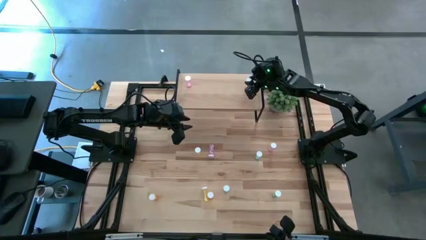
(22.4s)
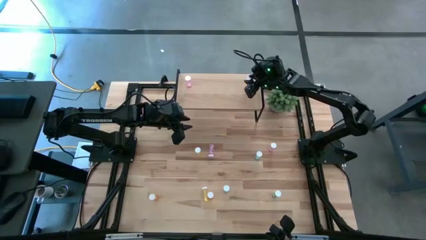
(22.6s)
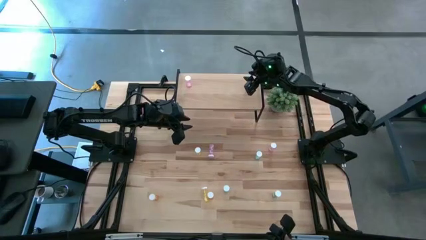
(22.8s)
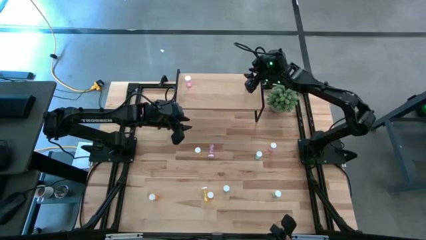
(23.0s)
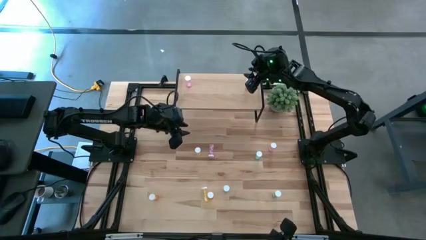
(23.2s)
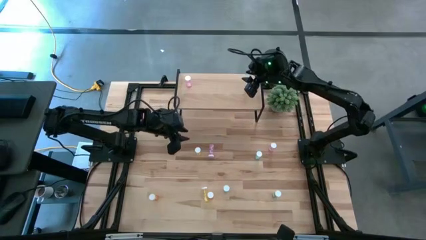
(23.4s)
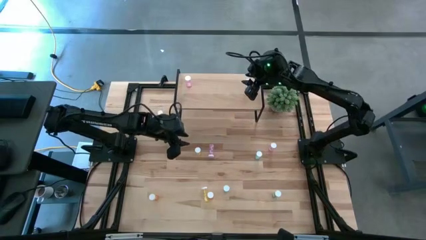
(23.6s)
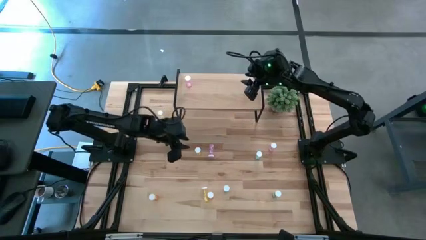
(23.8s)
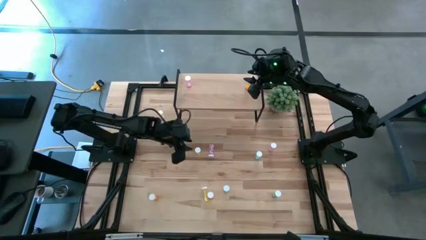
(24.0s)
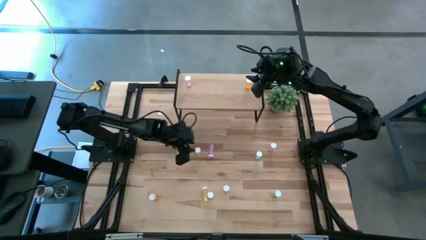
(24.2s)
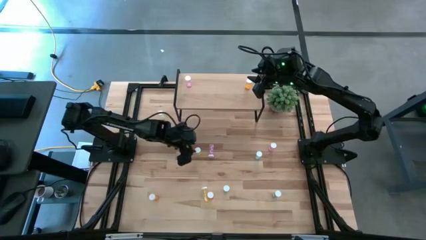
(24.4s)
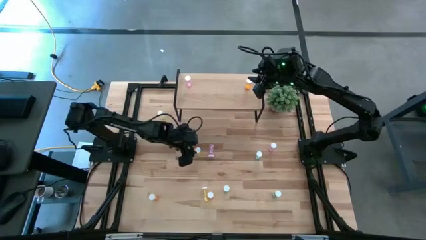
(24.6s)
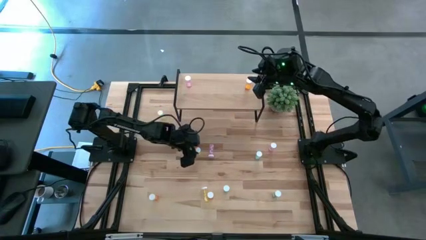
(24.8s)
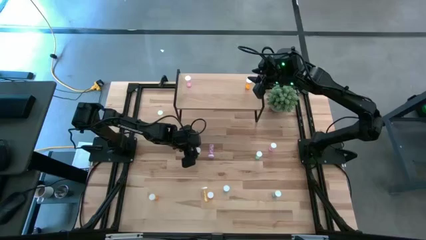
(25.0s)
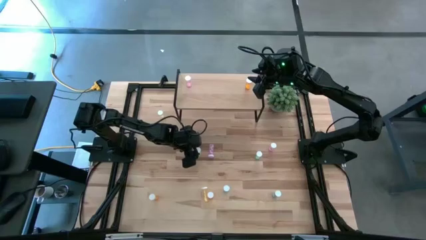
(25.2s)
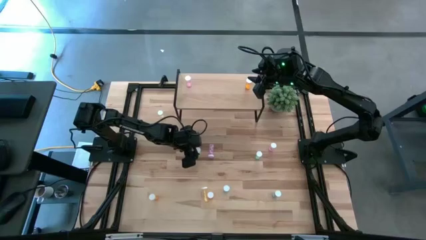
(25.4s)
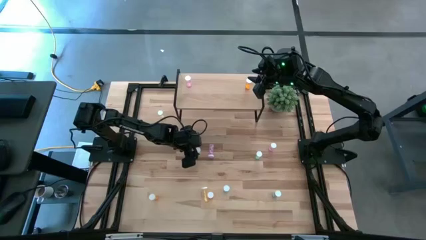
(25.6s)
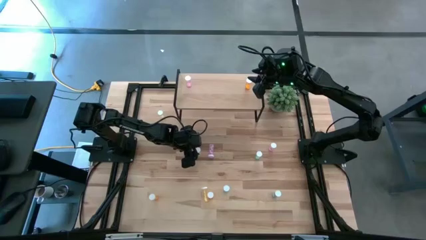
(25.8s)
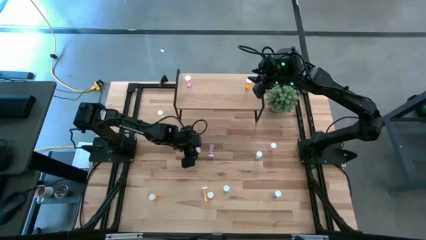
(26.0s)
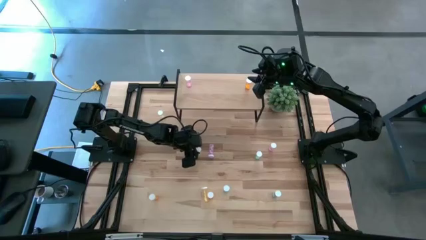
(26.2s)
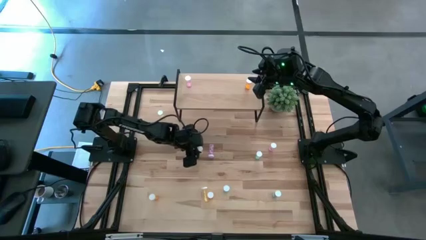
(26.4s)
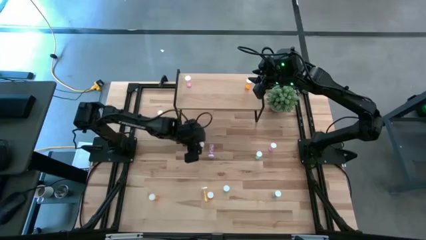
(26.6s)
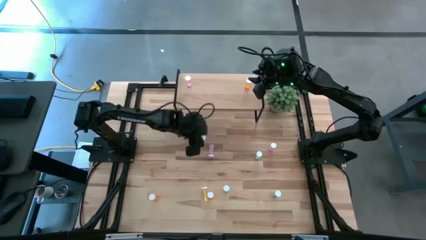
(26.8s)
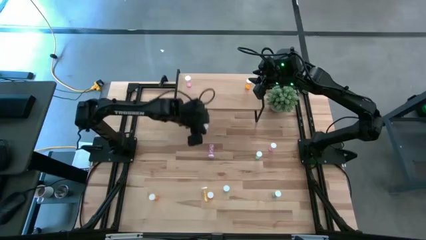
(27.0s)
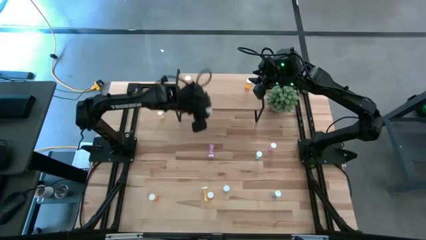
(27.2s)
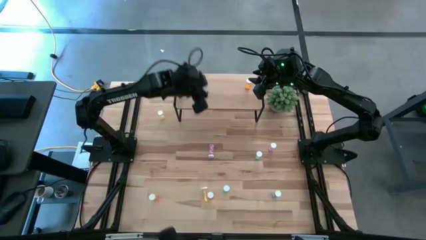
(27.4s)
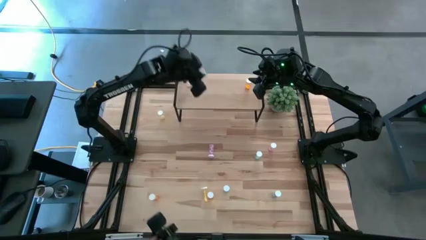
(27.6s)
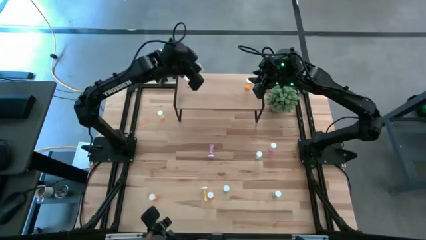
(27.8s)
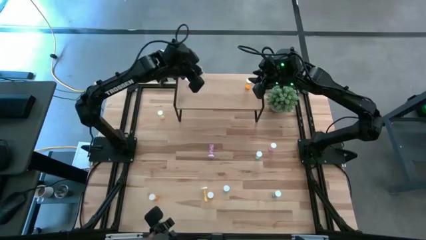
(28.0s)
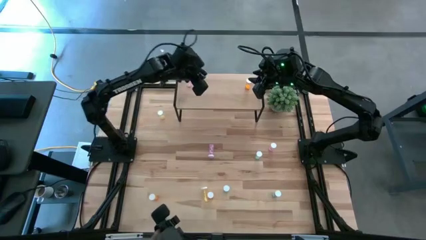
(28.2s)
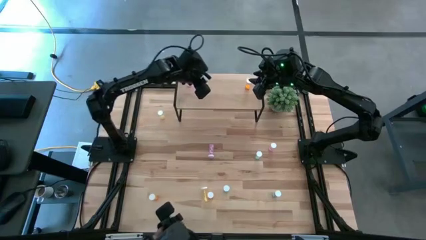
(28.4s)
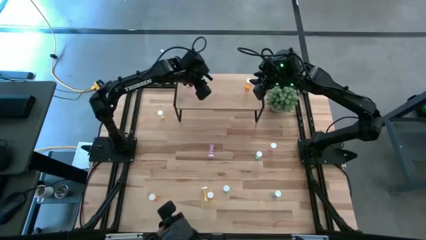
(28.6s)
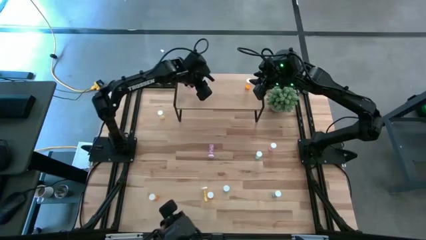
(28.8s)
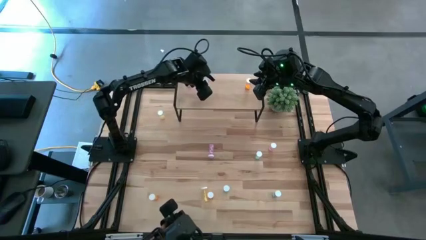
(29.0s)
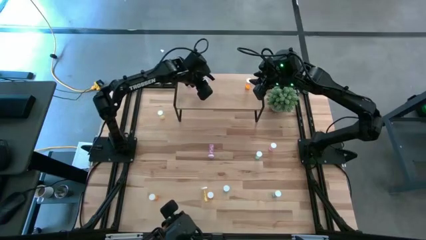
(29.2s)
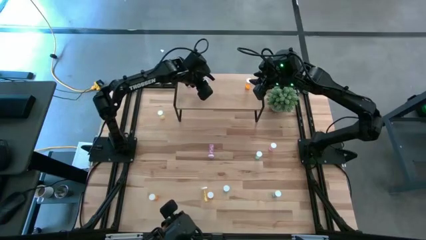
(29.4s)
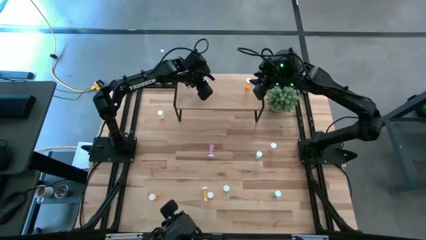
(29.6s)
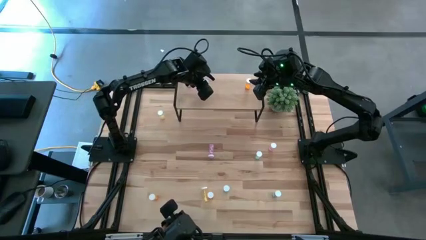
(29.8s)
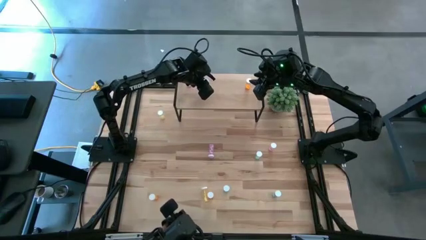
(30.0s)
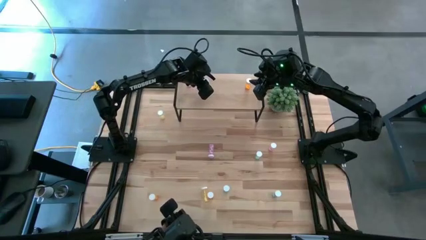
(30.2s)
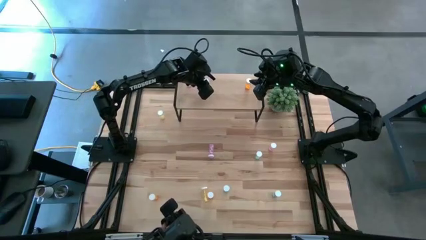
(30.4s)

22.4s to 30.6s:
Task: Pick and place medicine bottles onto shelf by color
Put the middle yellow pill bottle on the shelf

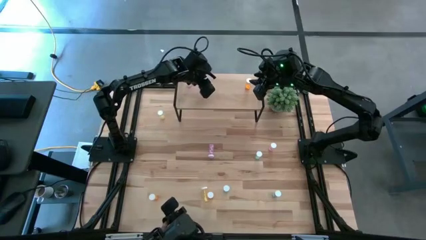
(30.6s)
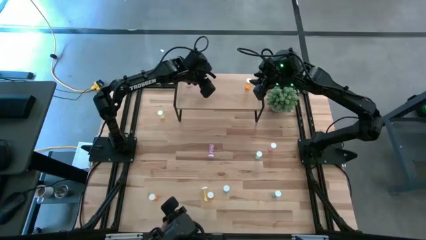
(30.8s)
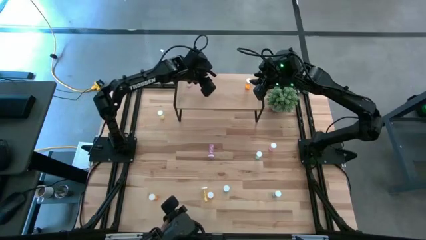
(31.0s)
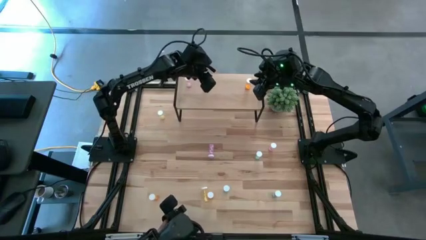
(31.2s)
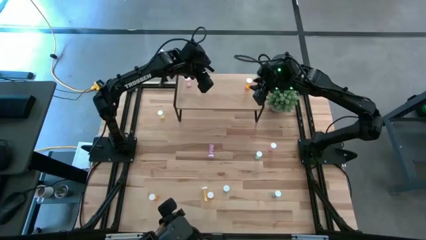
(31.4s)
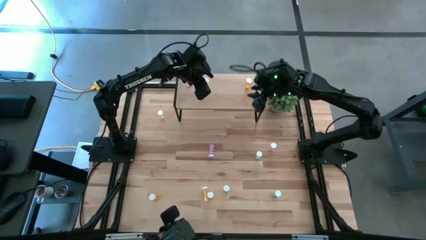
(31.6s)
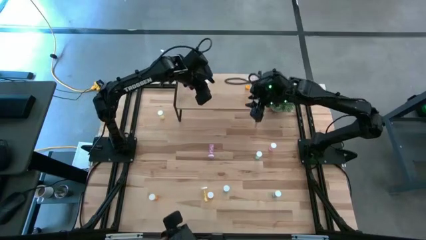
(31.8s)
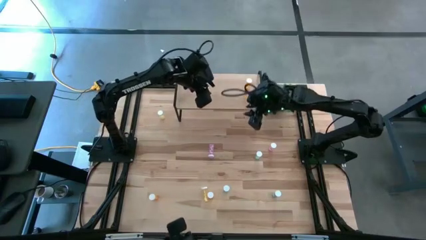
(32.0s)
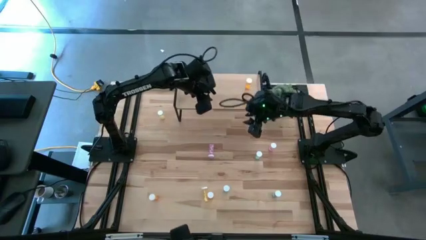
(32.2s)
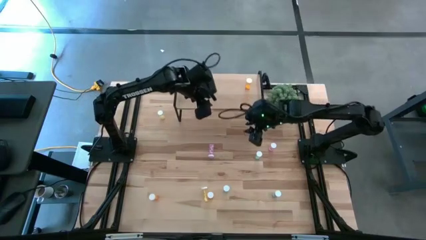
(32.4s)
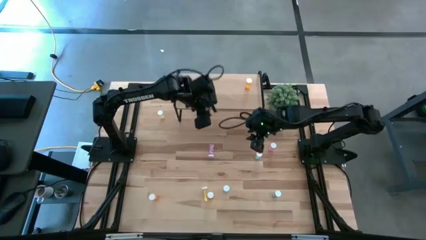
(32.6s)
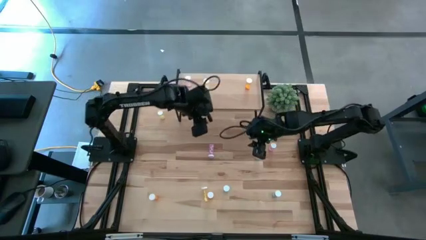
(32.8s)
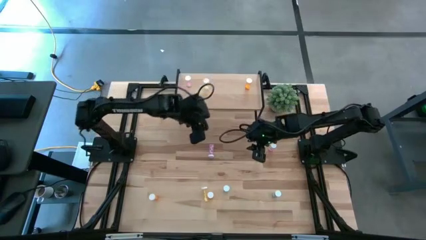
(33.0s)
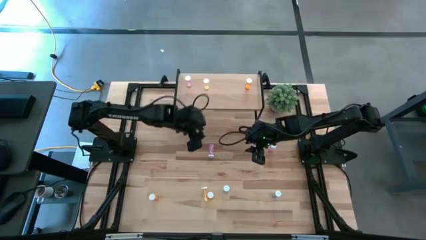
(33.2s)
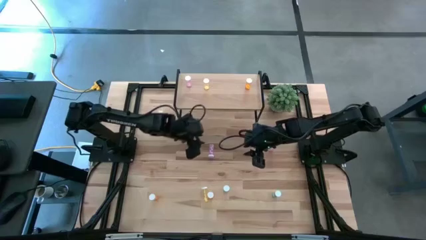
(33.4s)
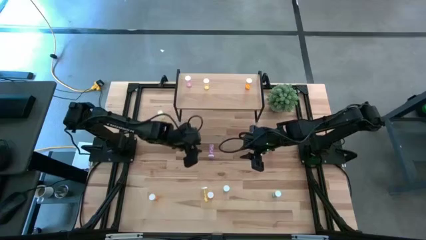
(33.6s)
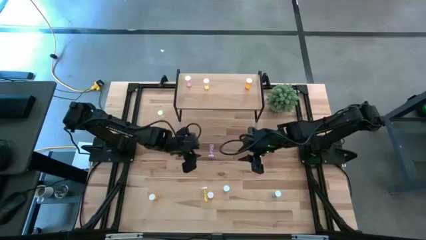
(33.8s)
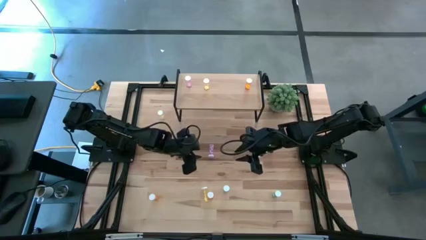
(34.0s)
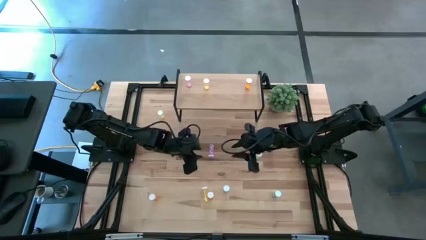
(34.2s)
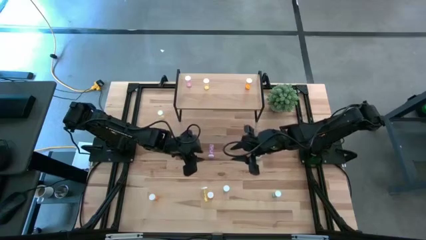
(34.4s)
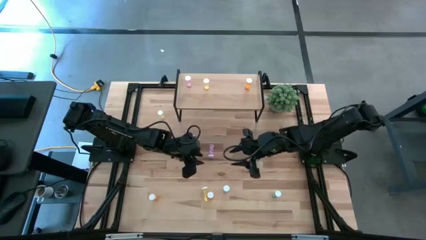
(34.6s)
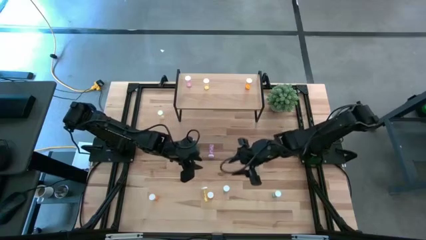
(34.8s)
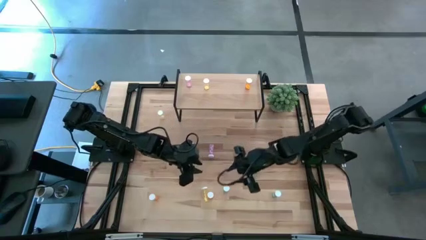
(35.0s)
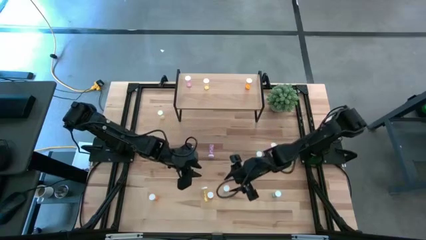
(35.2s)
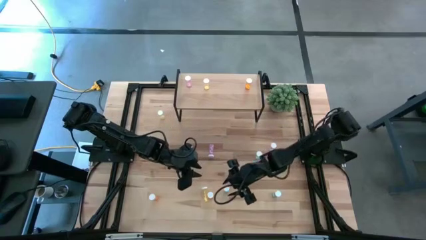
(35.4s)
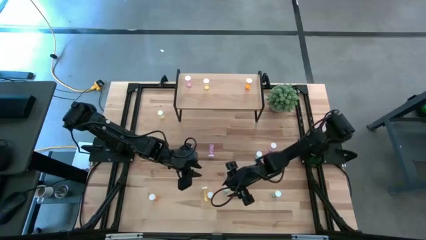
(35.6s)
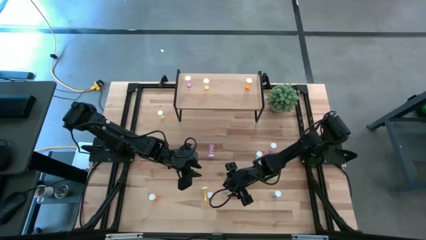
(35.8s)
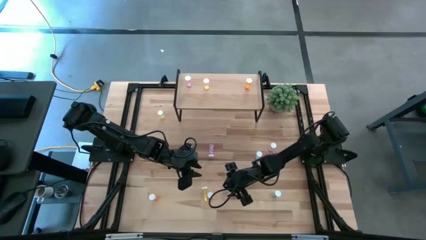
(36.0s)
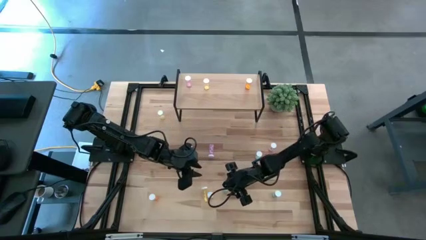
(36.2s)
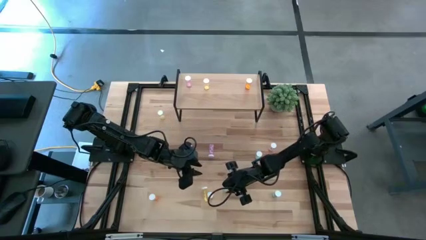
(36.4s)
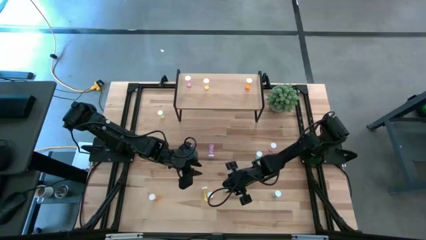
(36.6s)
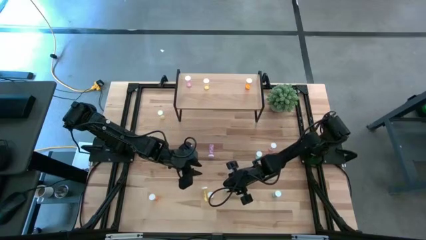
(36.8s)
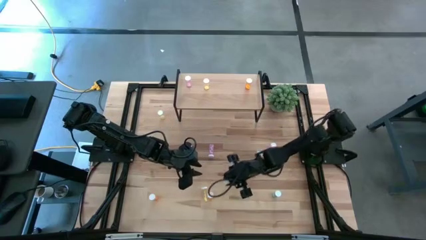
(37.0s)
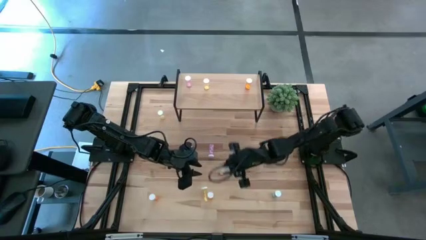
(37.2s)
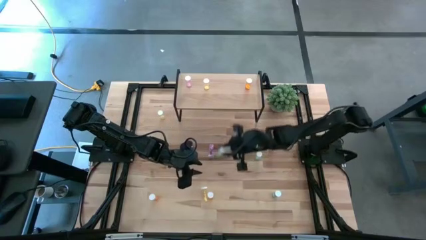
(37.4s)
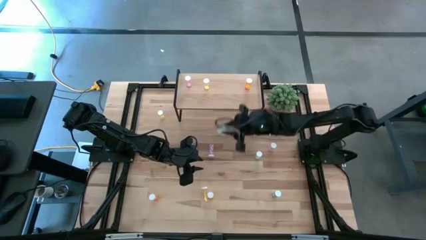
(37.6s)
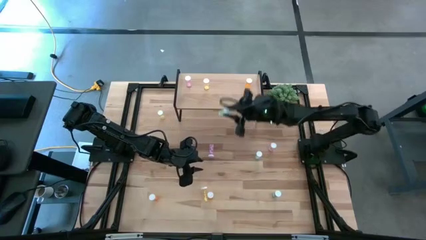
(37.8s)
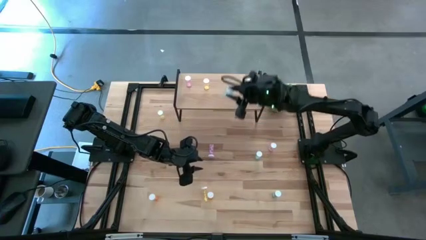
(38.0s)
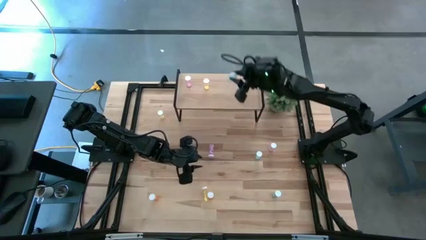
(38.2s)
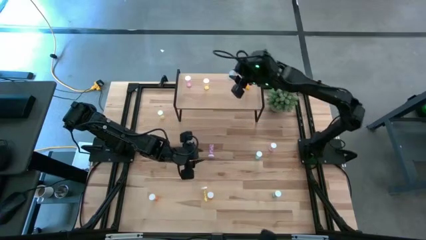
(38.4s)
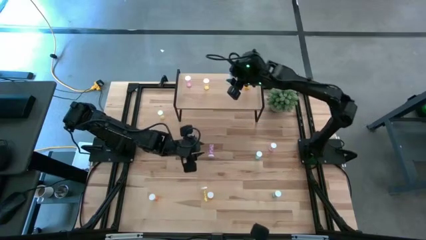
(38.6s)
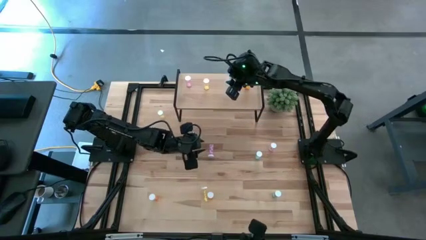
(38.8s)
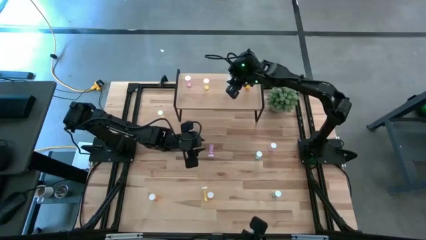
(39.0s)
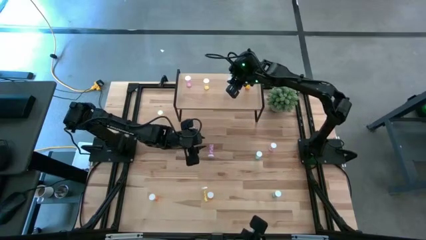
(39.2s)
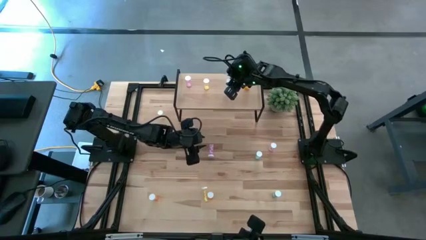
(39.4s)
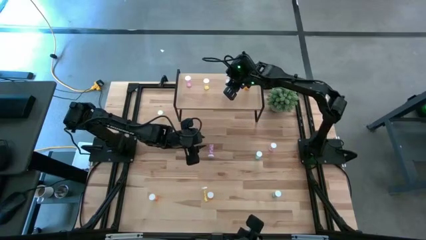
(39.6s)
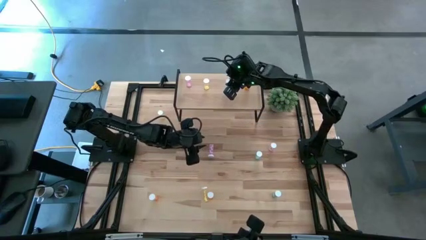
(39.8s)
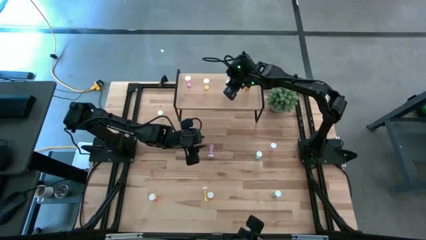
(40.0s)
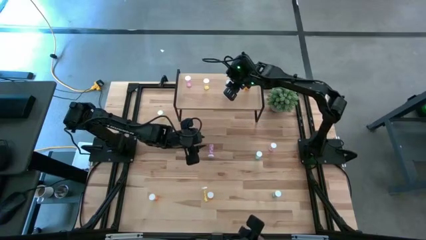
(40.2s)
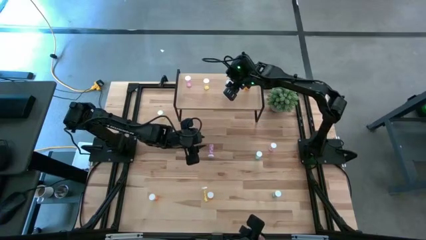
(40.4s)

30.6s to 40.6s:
Put the left blue pill bottle on the shelf
